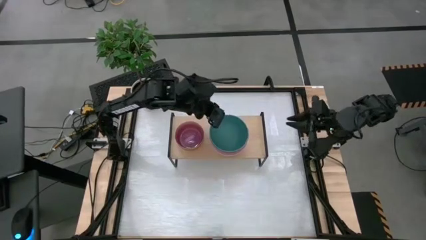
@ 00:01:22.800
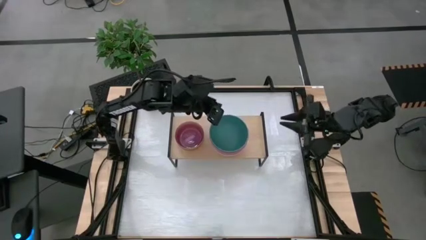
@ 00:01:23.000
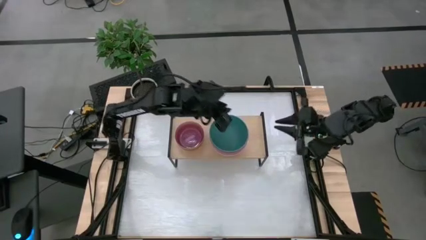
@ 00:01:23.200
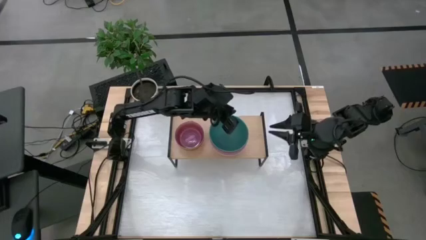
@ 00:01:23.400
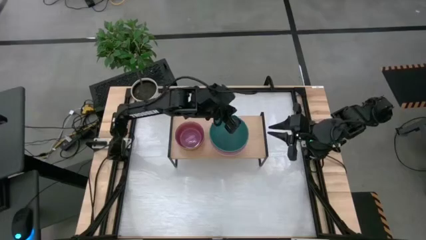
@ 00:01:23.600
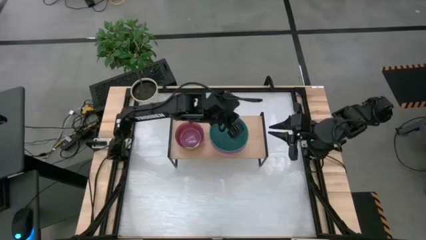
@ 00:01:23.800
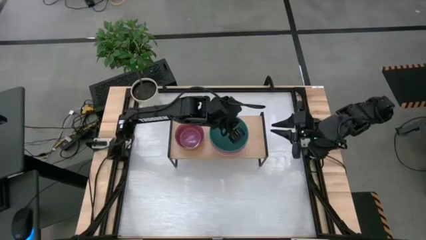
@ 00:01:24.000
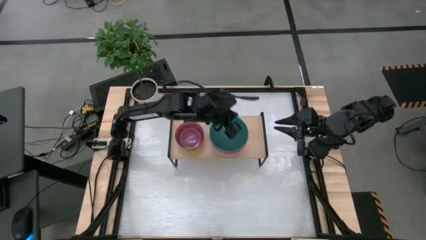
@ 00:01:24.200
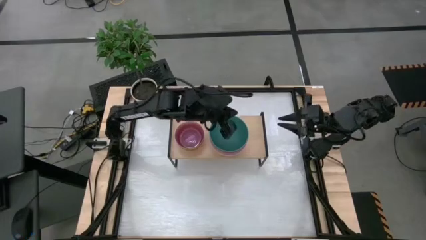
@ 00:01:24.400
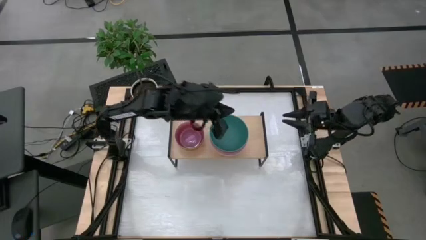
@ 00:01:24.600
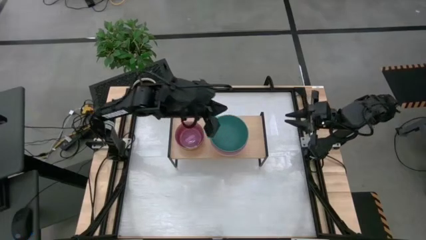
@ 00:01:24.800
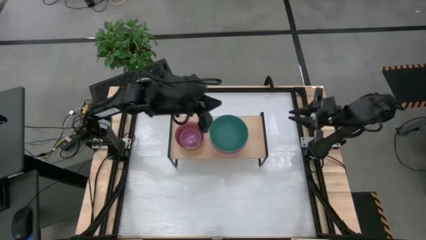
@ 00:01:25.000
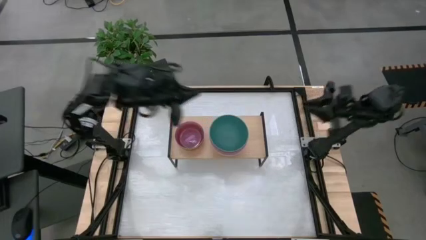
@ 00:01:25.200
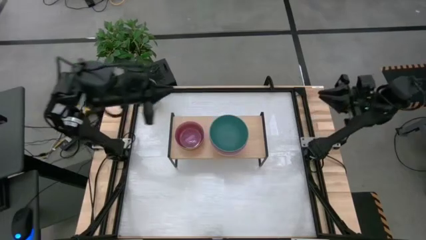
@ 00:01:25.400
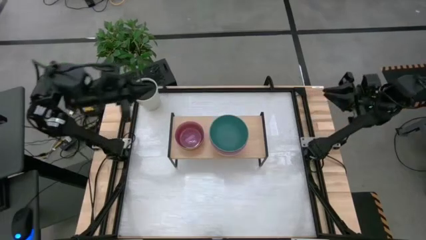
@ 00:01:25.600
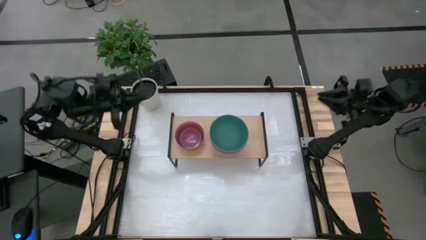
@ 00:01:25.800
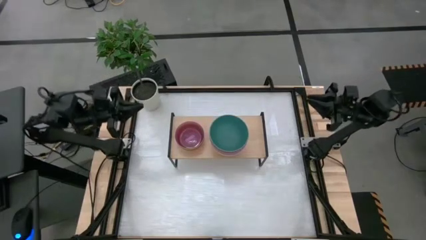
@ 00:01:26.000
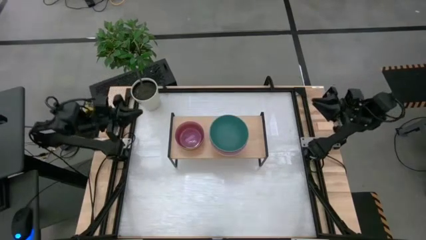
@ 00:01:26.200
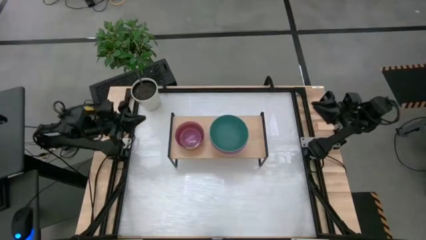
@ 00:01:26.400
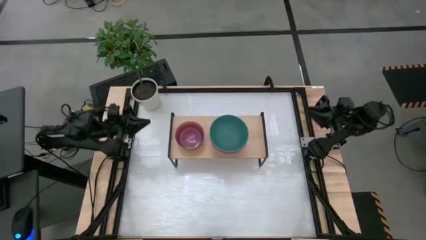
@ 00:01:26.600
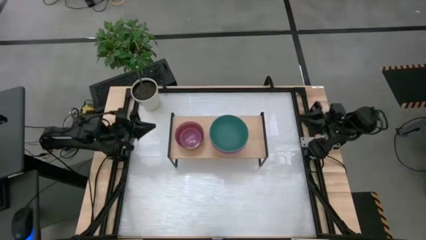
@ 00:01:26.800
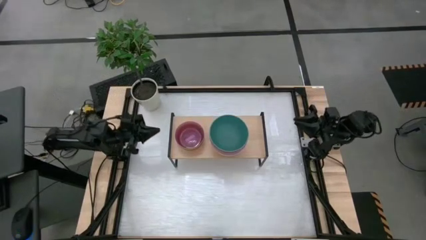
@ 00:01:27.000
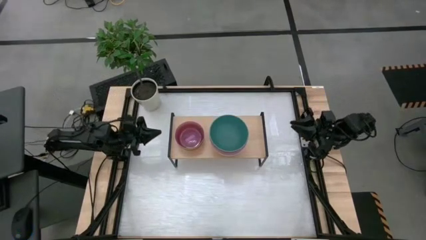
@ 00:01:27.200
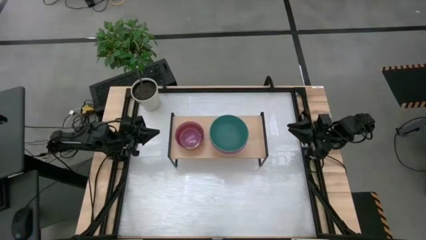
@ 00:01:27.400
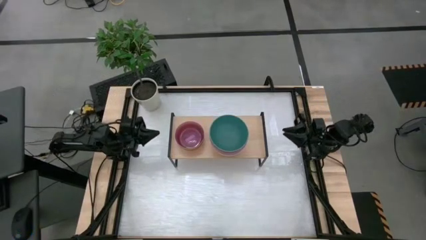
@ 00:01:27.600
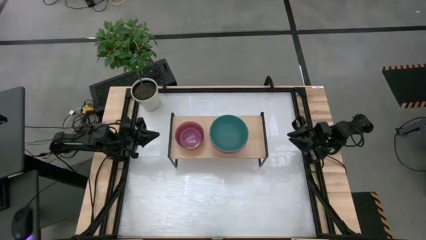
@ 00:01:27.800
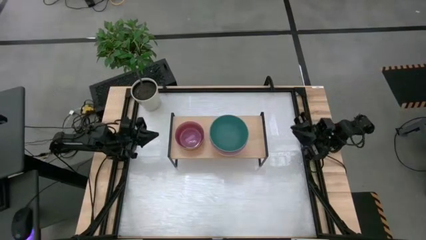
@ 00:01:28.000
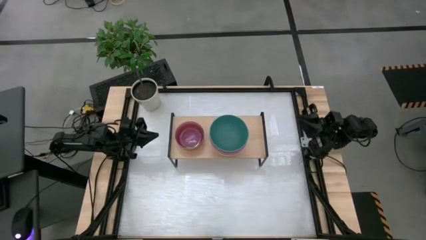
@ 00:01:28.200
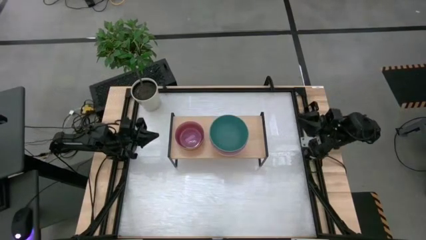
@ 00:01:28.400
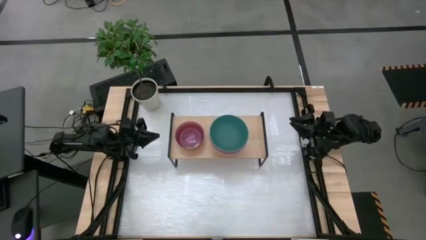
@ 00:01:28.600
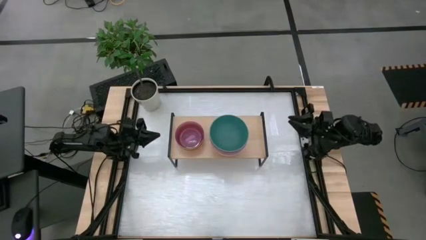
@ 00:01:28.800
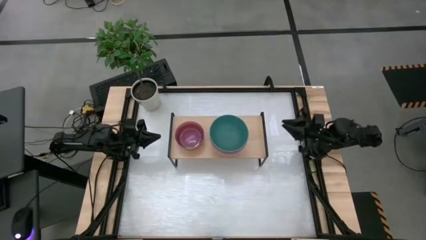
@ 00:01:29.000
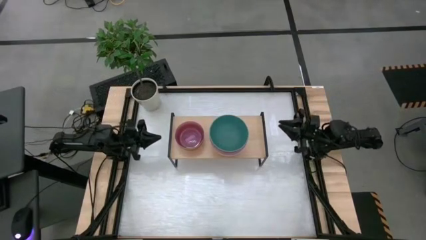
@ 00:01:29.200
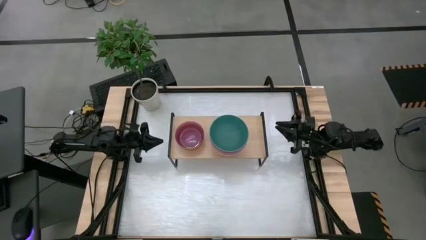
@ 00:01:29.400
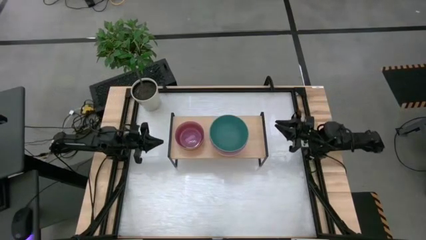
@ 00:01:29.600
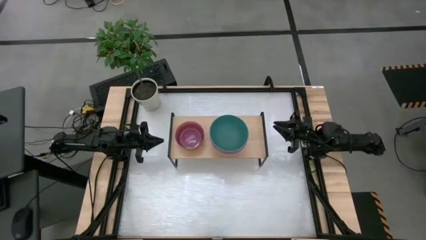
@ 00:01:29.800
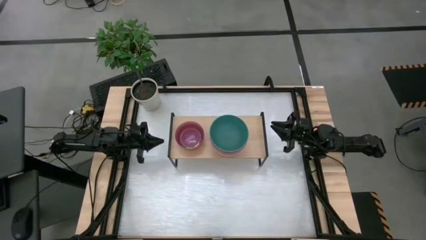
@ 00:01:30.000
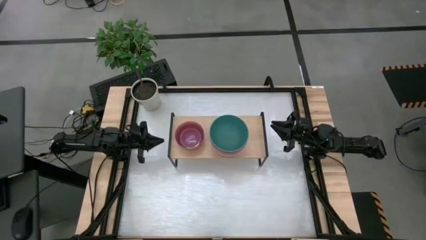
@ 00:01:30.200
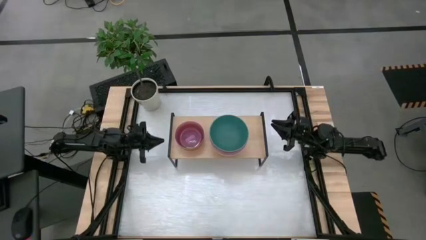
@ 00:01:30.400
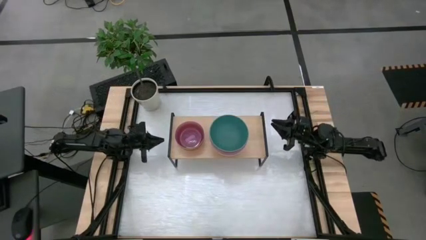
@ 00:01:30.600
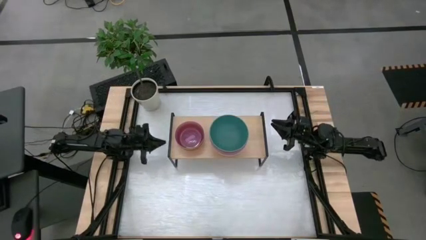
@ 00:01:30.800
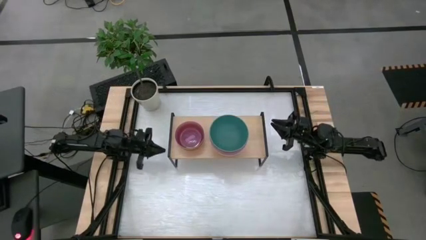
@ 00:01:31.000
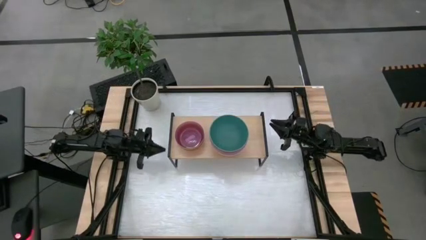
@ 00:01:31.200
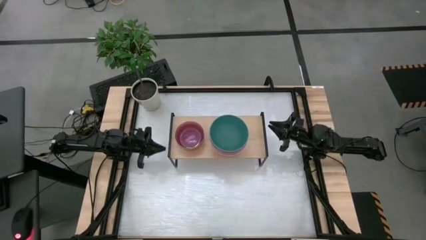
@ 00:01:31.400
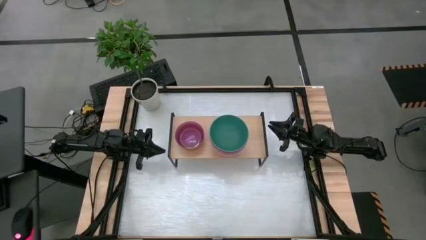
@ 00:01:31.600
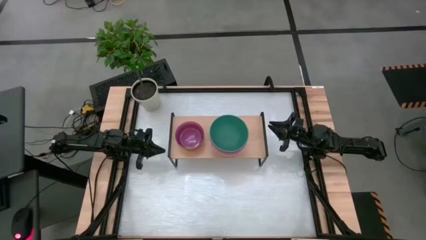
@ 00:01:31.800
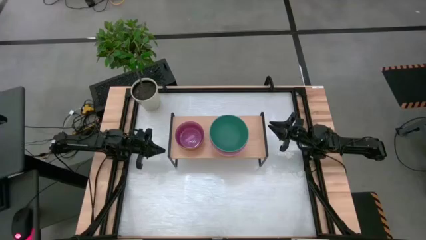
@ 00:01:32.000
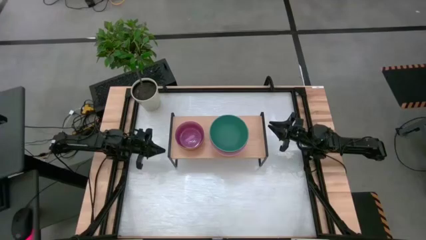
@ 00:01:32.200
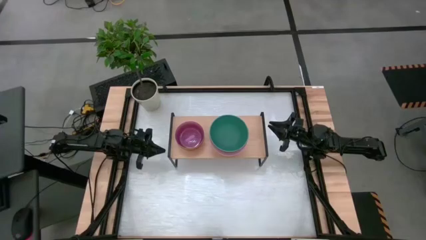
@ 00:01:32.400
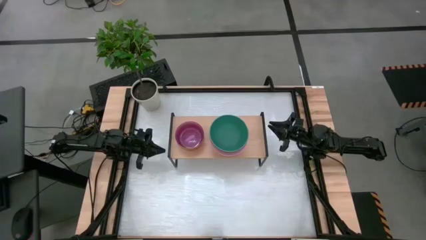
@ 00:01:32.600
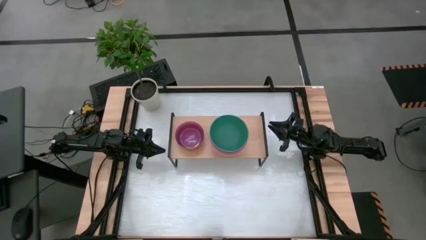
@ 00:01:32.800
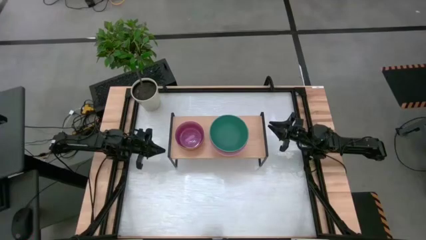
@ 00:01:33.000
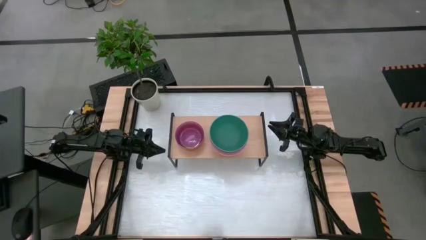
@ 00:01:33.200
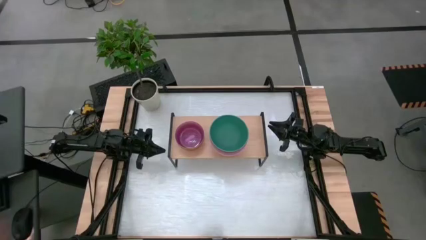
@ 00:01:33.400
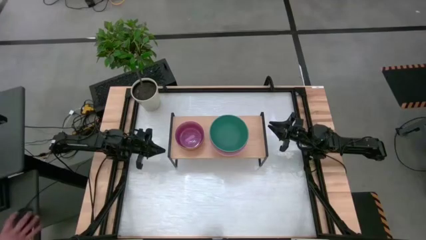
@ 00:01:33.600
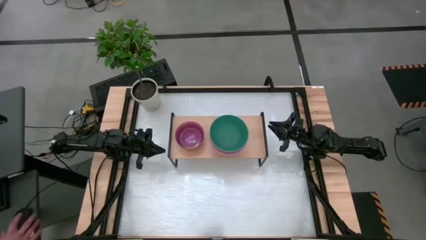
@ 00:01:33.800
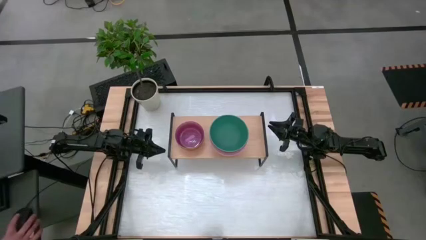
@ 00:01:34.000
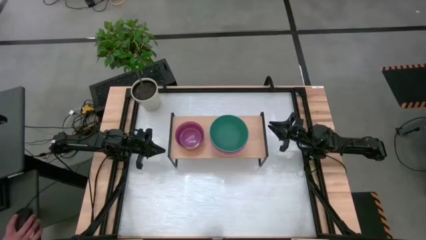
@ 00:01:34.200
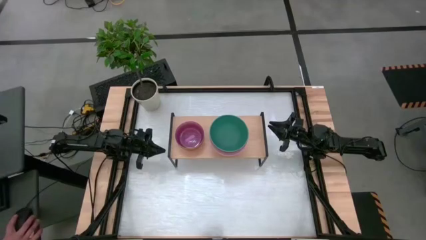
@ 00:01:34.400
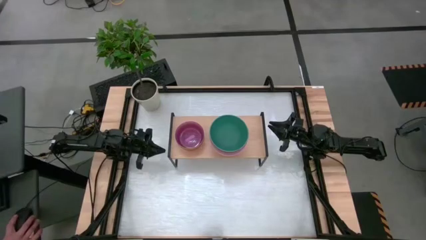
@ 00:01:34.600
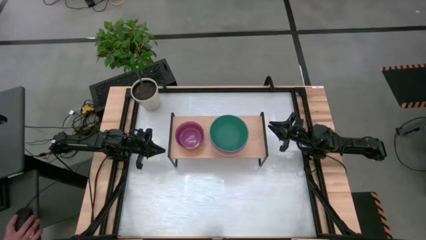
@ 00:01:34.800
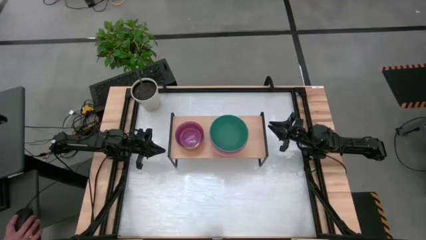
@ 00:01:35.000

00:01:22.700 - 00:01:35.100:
Task: Place and stack bowls onto a shelf
Return to Home Position
